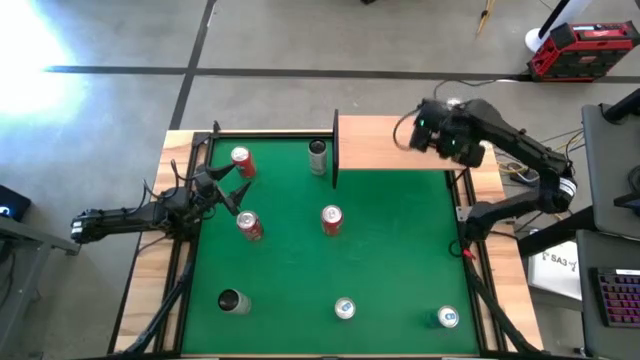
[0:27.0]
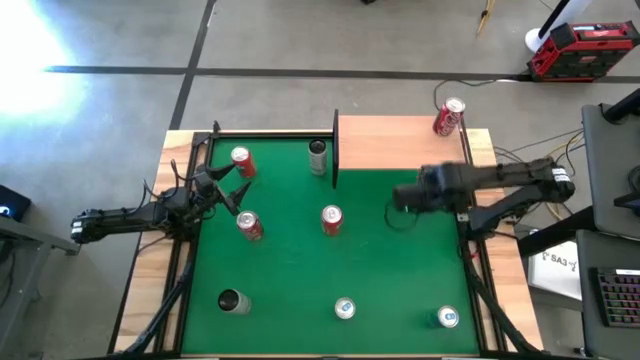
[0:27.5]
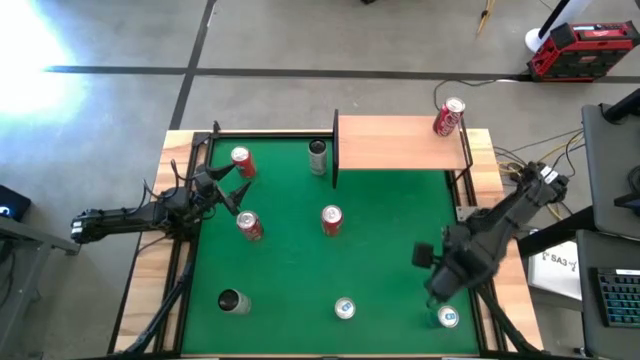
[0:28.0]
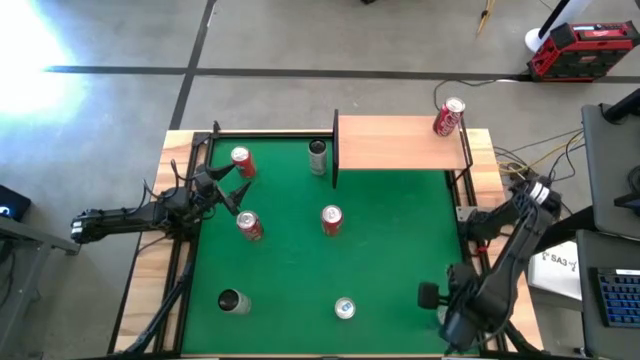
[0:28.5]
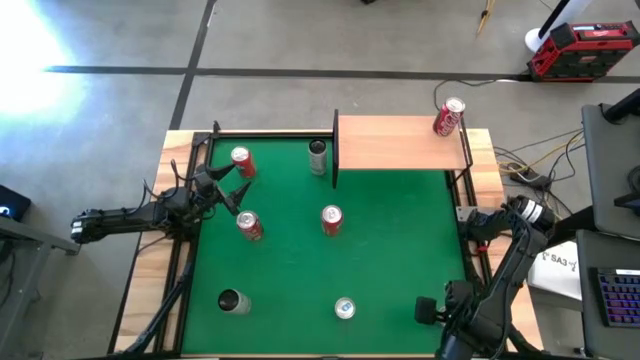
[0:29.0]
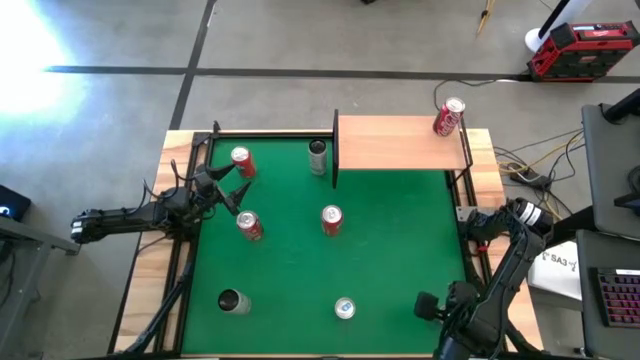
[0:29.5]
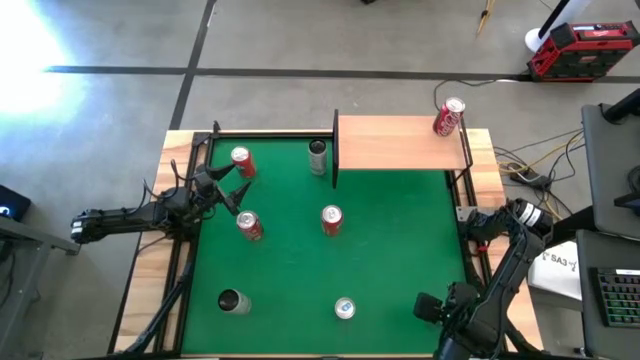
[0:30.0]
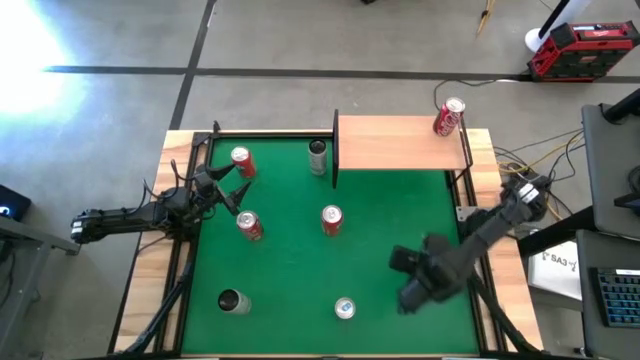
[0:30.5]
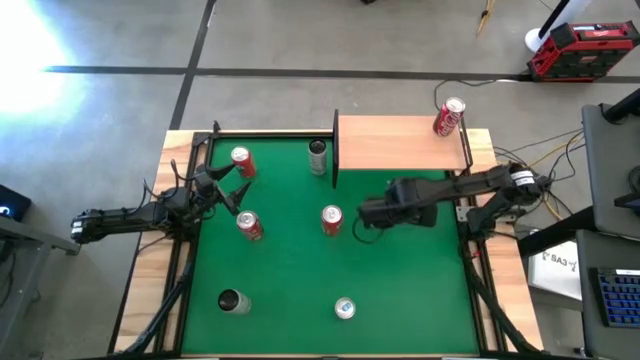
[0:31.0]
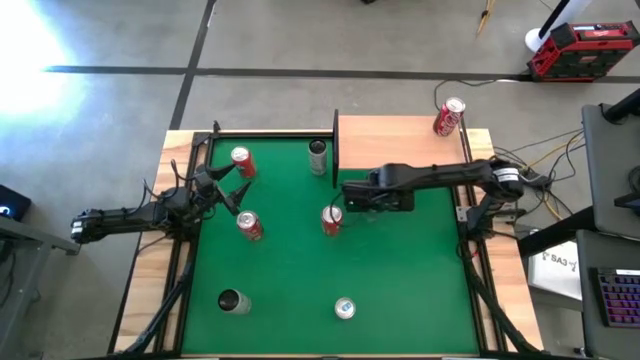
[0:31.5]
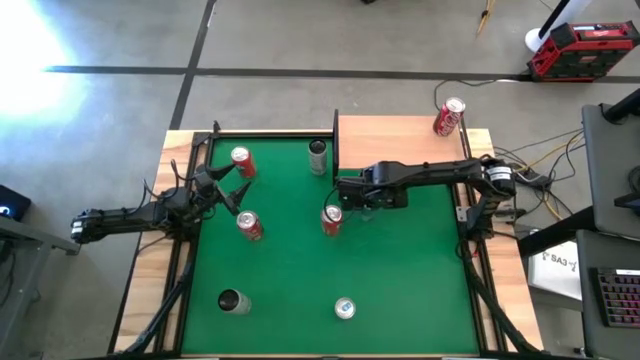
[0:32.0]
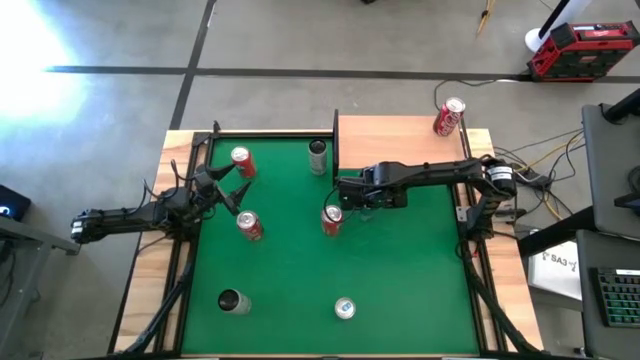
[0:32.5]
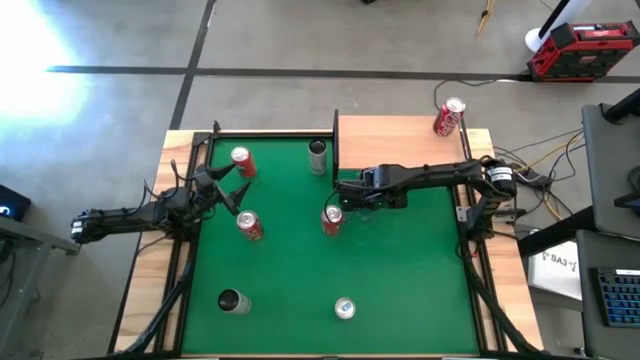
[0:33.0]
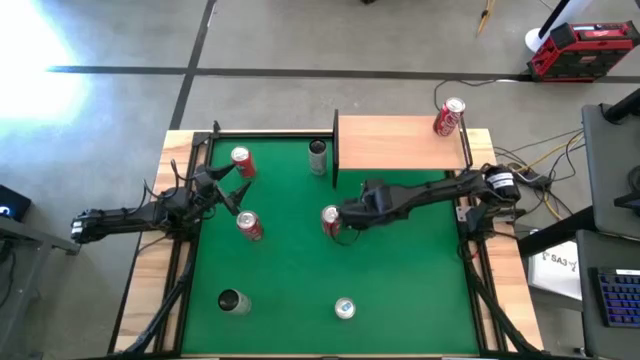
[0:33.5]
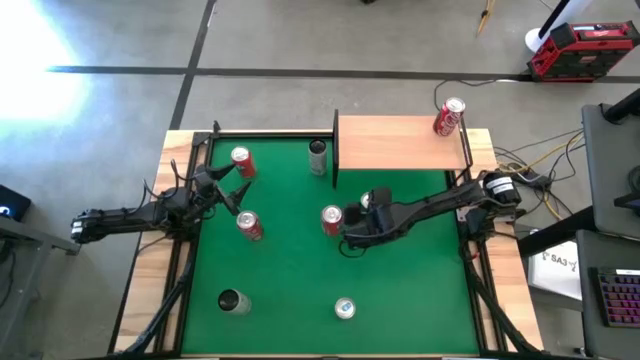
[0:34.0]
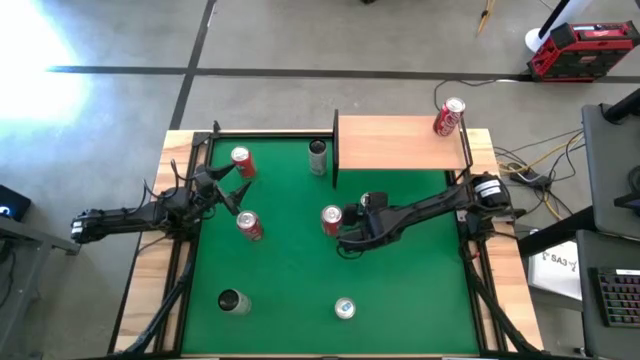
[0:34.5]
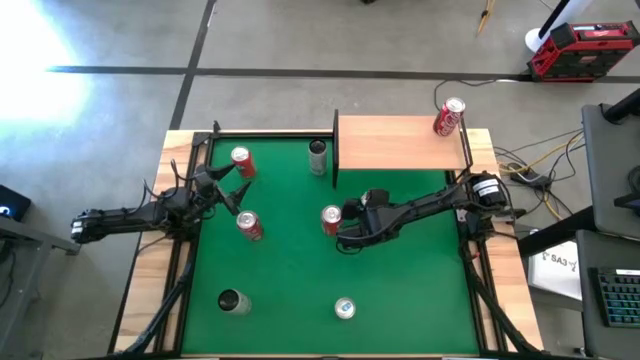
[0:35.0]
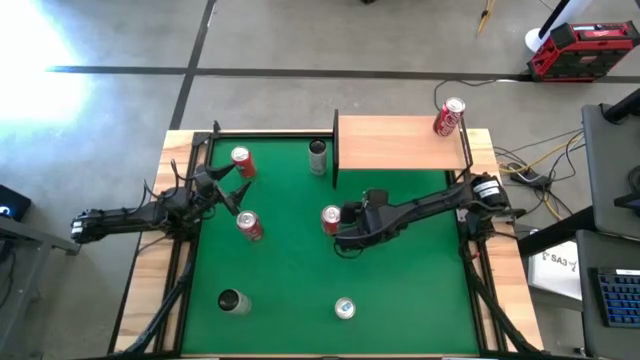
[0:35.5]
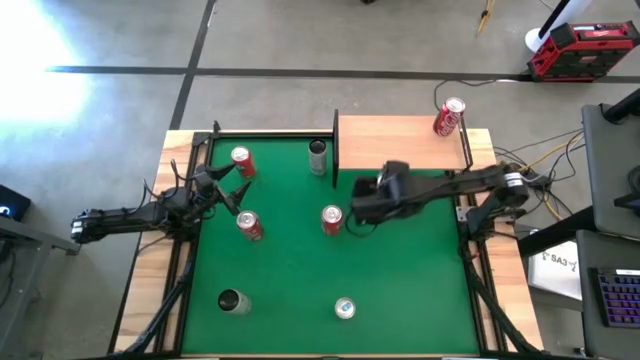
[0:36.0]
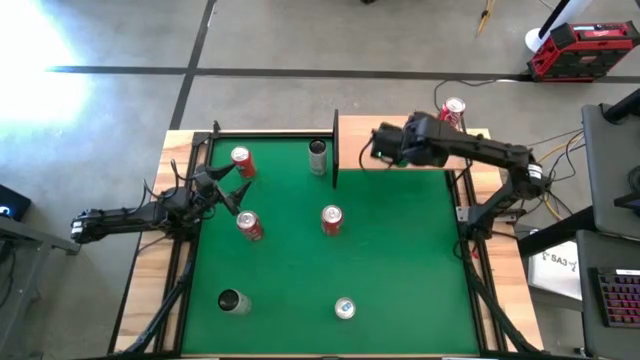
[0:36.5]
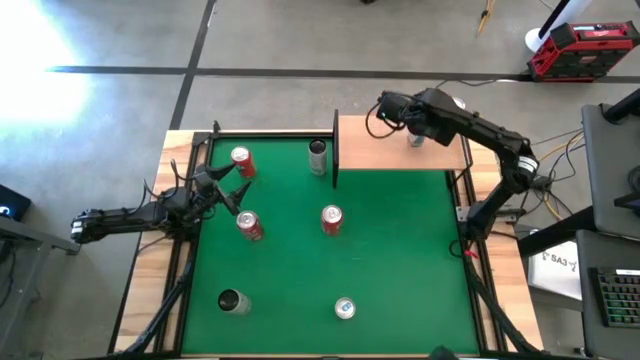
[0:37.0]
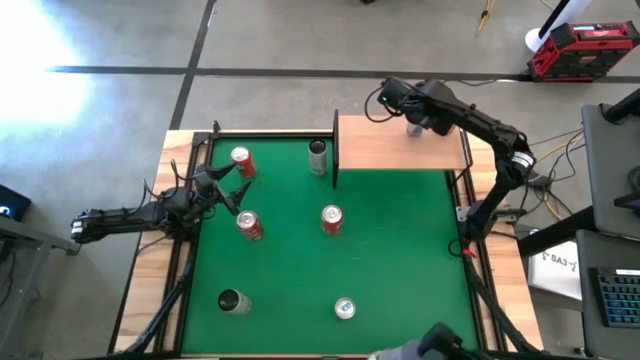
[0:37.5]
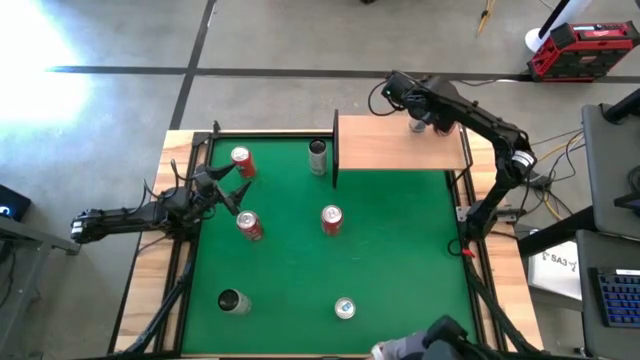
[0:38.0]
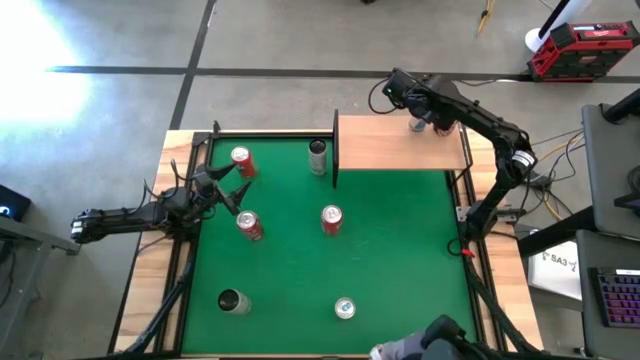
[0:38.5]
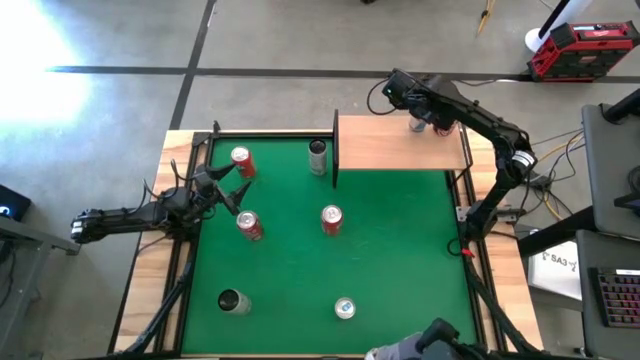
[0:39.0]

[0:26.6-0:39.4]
Task: Place canned beverage on shelf
Put the top blue soda can on the shelf

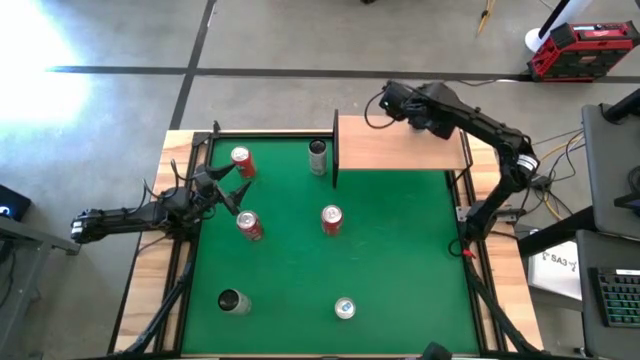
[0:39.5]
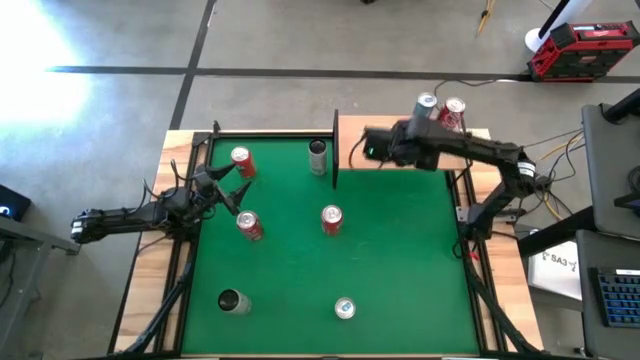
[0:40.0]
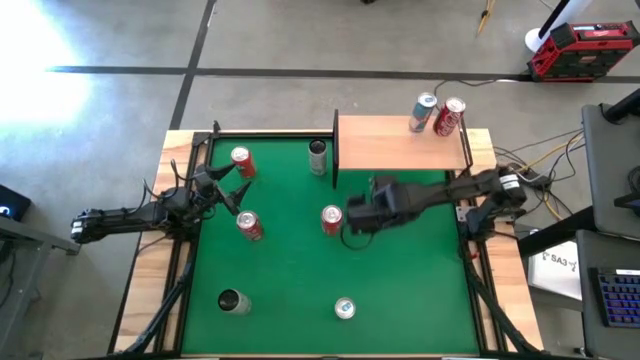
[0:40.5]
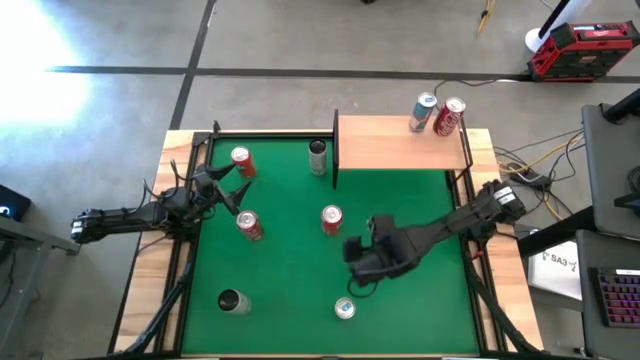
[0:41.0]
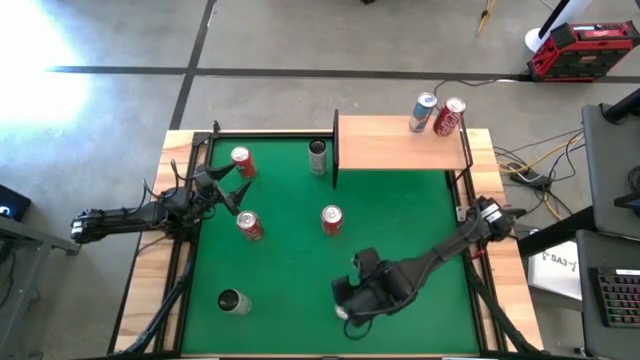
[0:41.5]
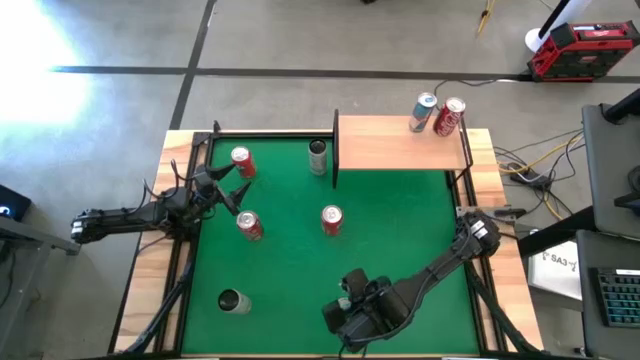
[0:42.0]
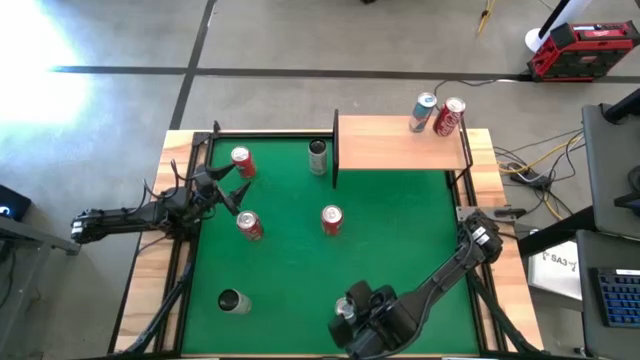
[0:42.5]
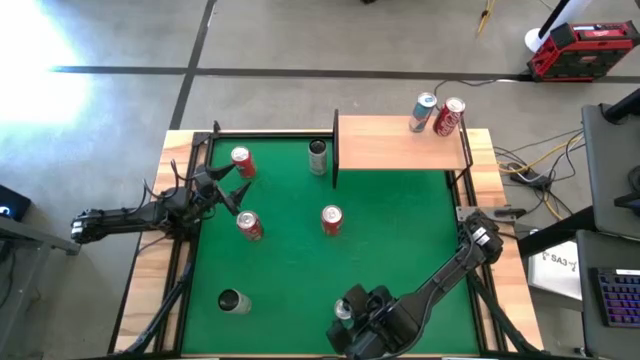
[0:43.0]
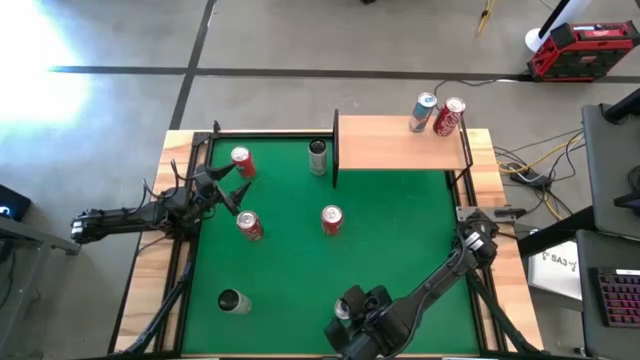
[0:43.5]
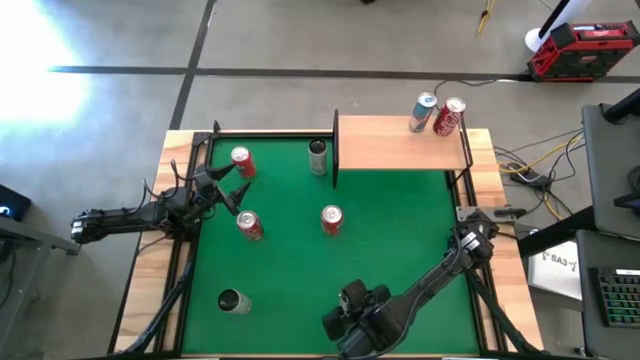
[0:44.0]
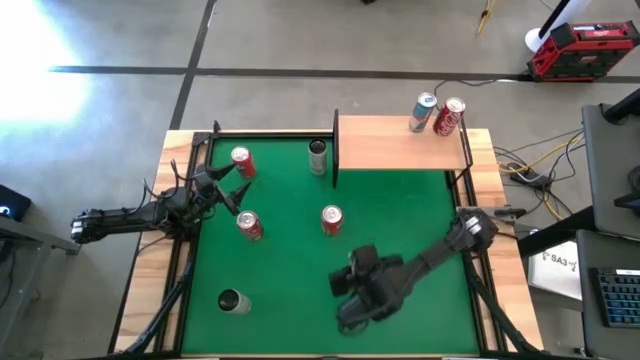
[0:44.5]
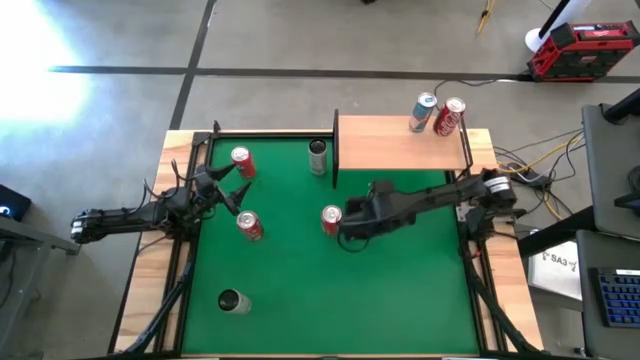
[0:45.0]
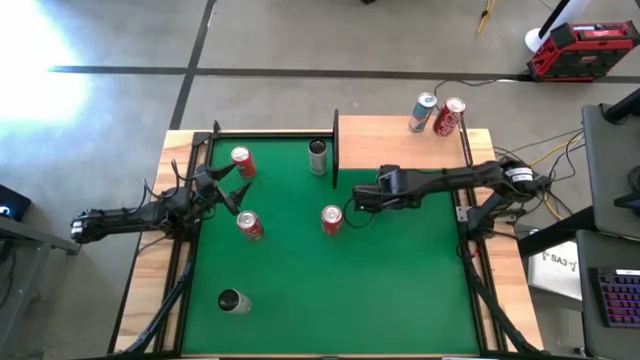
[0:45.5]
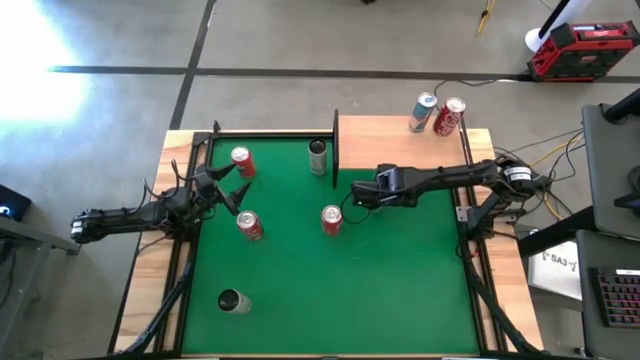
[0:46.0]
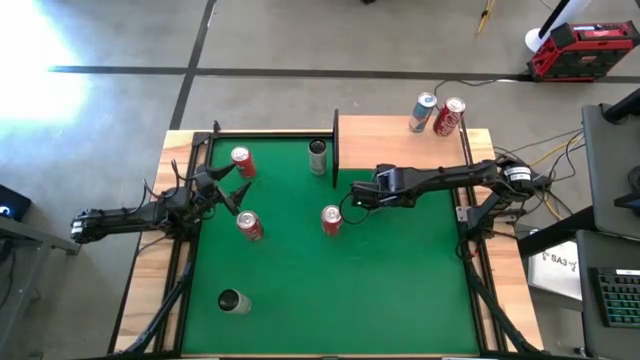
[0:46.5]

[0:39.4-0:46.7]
Move the blue soda can to the center of the table
